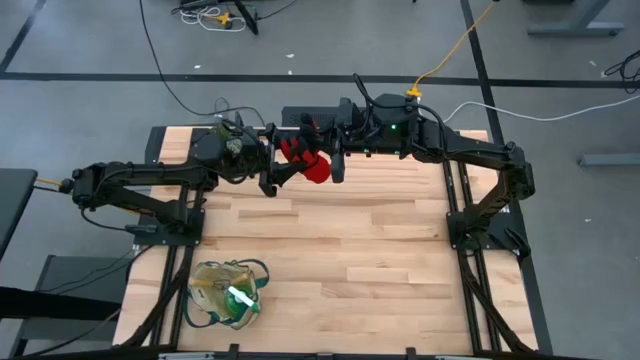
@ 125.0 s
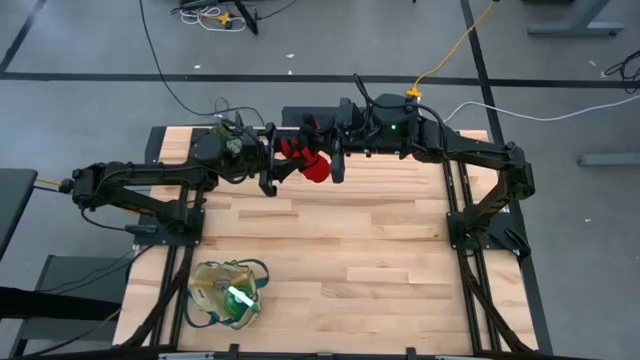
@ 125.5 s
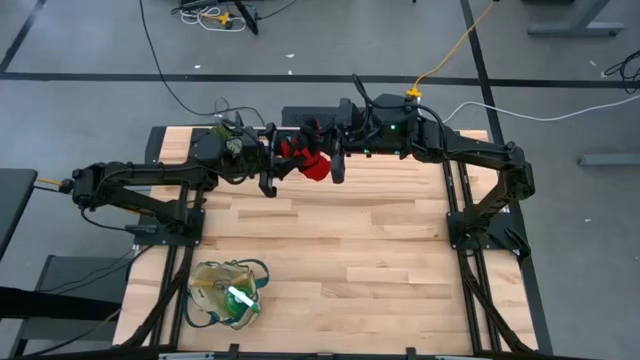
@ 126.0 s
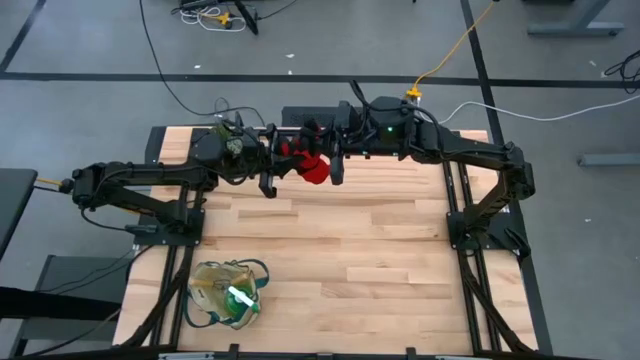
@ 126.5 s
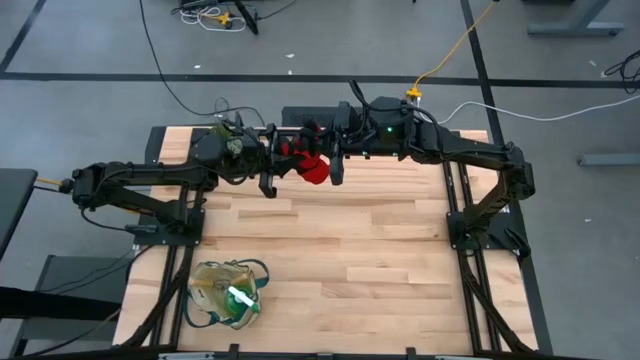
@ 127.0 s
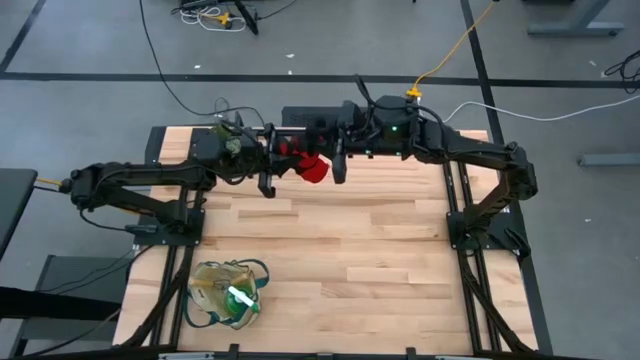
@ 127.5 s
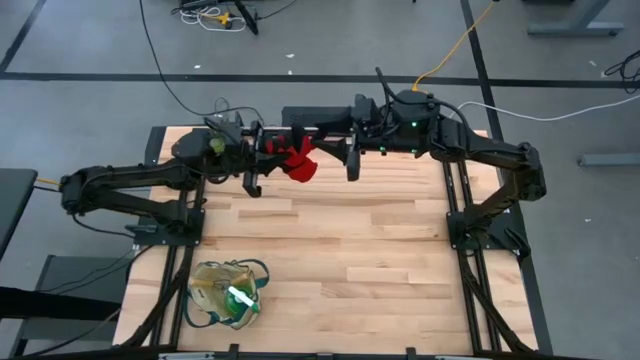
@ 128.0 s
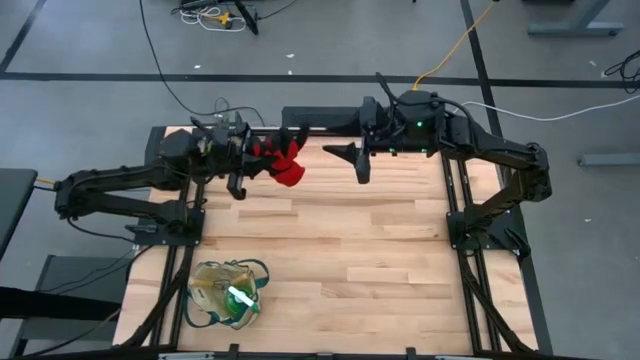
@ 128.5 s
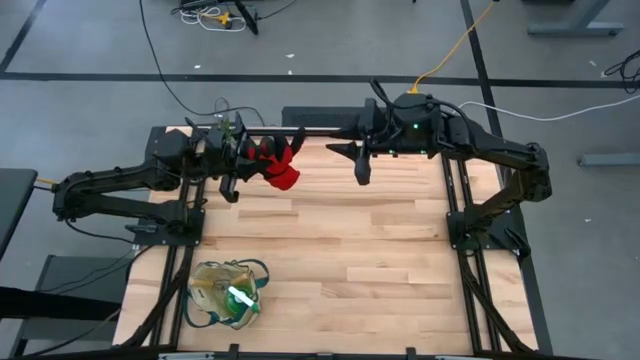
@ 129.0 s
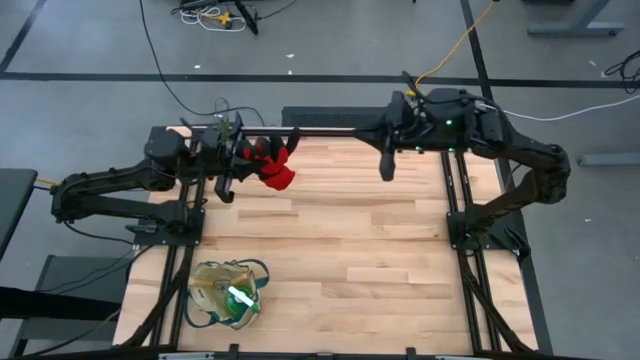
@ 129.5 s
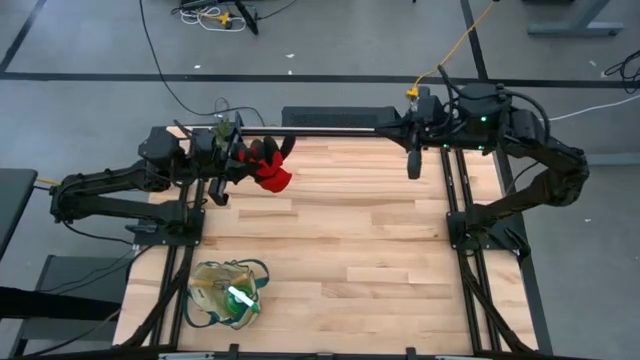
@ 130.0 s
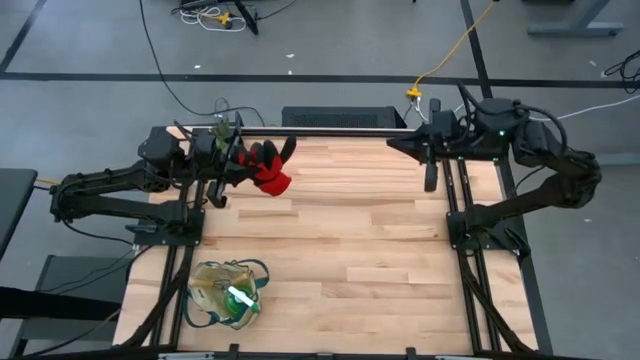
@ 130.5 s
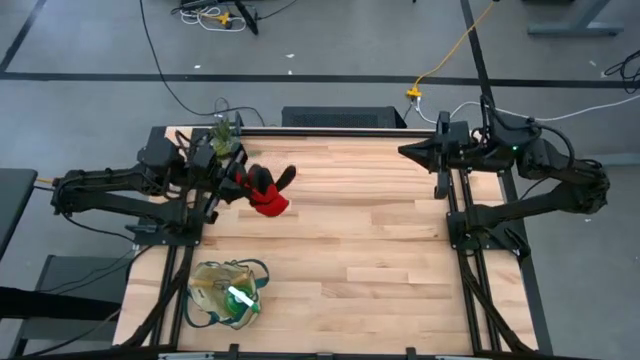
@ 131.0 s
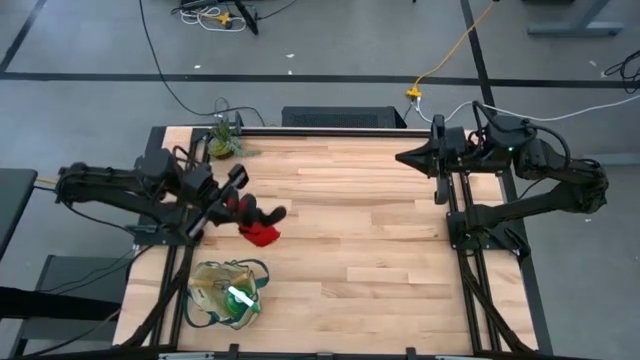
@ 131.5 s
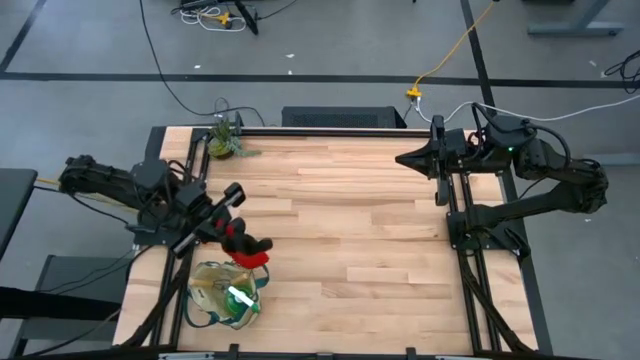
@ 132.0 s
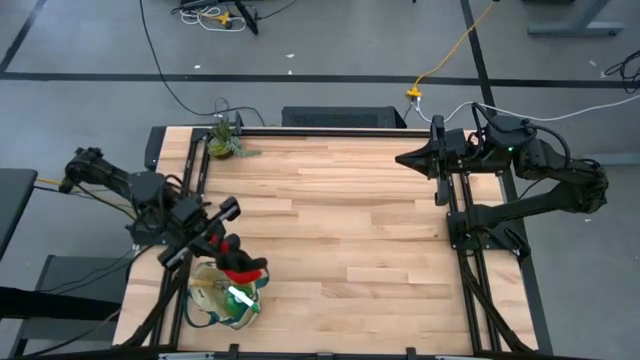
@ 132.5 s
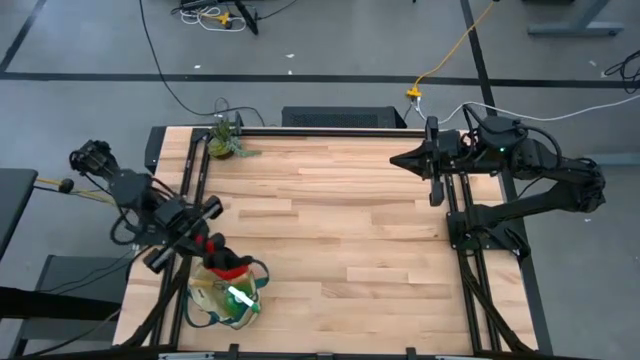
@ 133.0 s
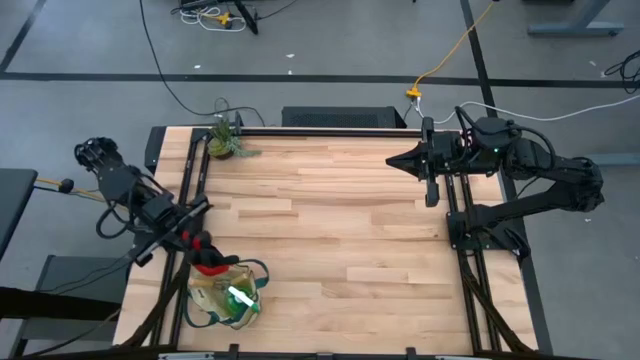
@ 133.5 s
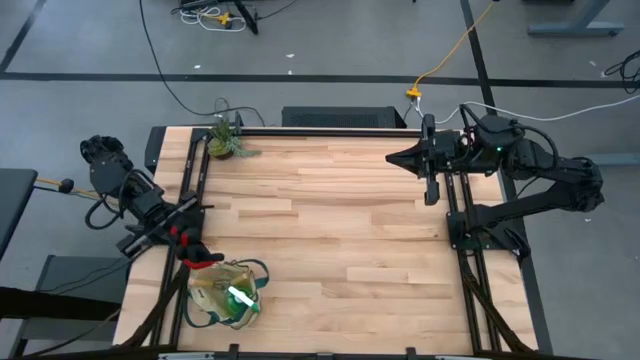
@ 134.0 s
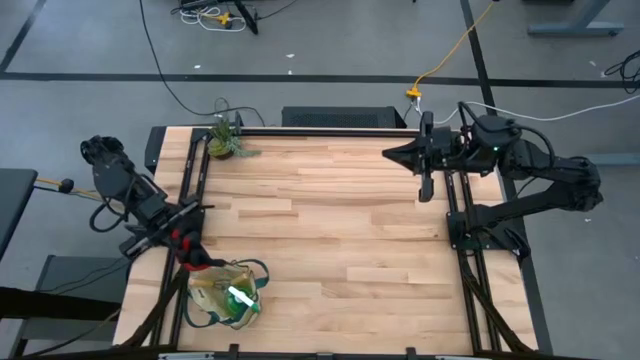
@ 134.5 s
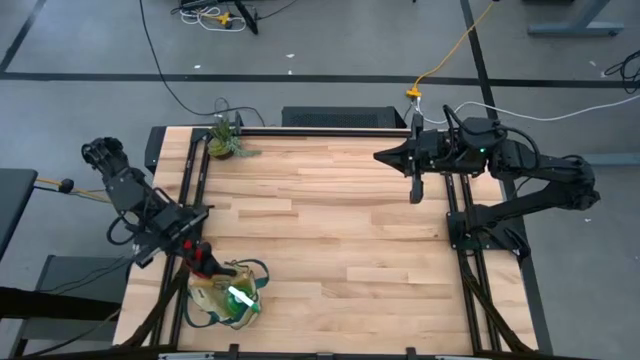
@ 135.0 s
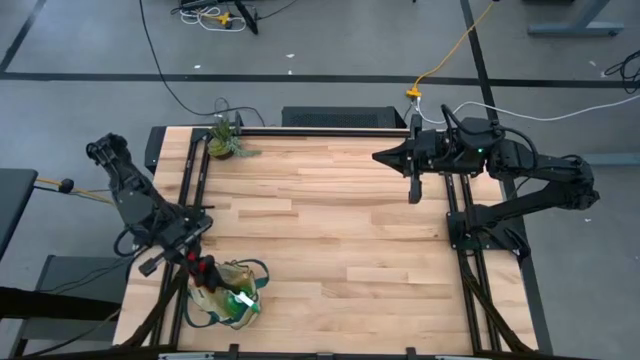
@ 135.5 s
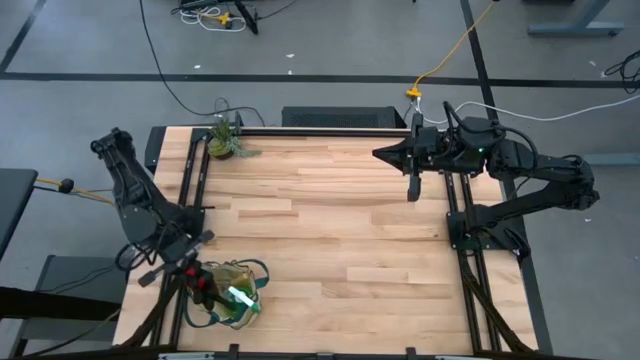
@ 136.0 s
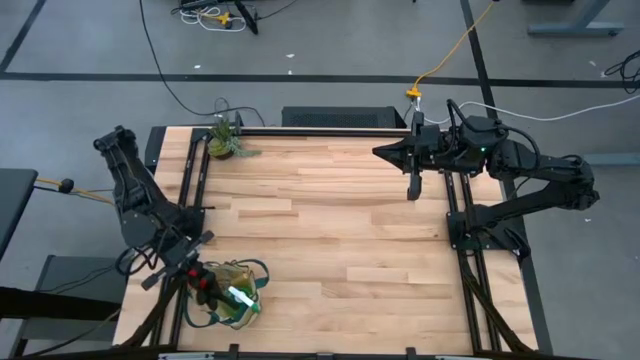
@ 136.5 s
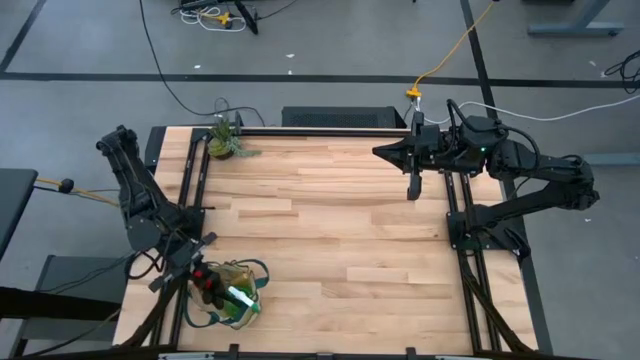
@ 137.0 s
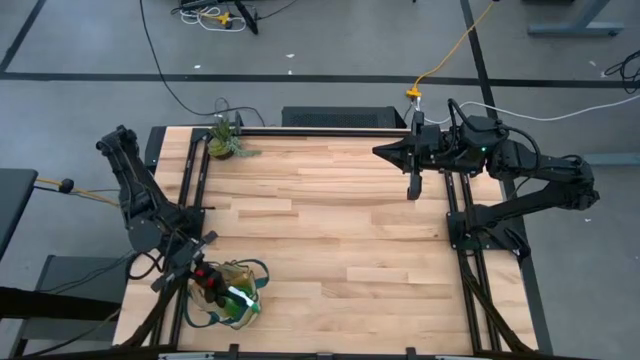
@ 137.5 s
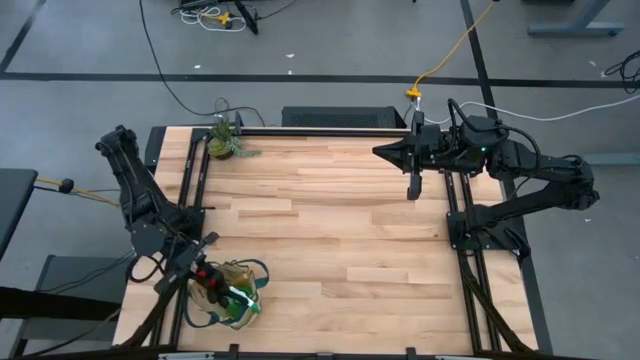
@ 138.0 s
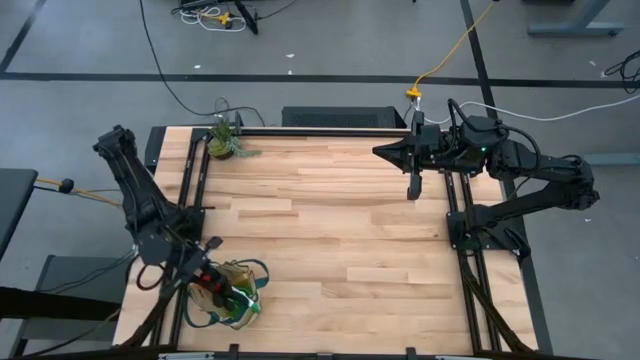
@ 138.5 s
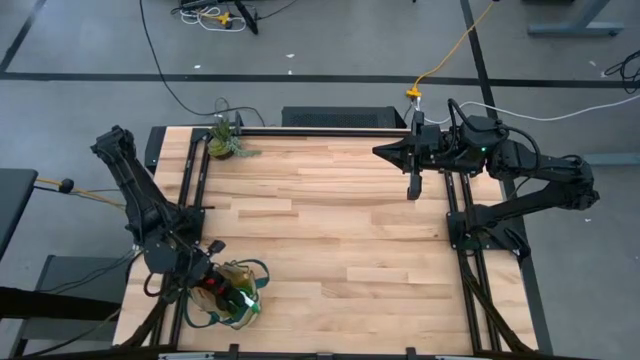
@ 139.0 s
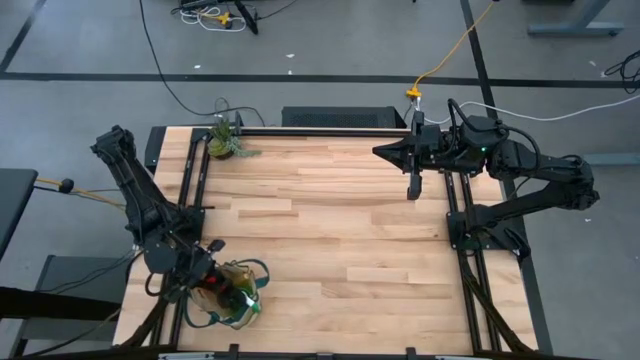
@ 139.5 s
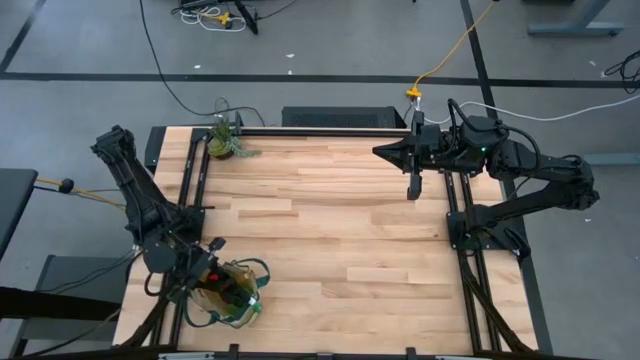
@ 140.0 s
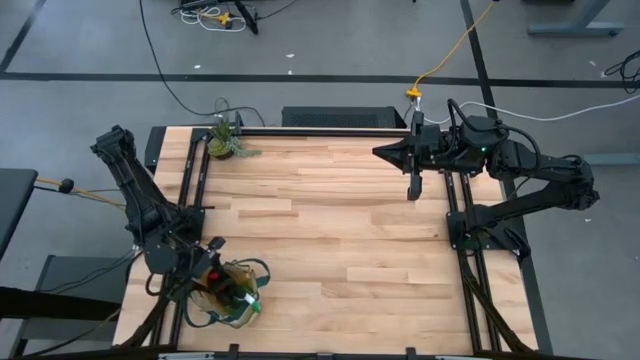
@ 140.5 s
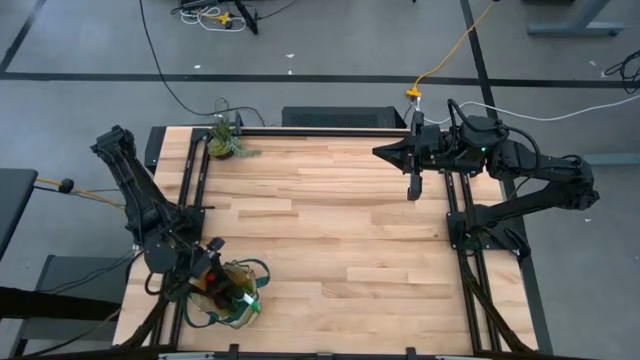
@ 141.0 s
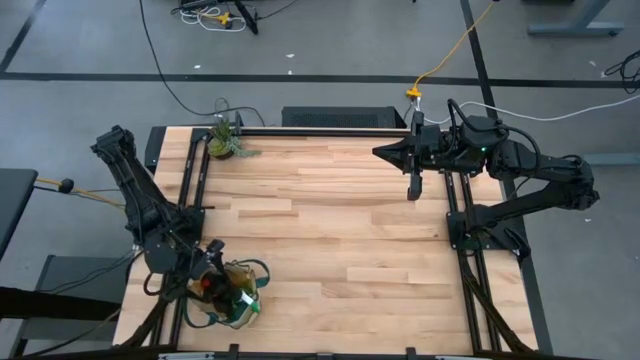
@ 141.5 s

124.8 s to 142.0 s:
Task: Pick & Place Garden tools in Gardening bag
Put the red gloves into the white gardening bag

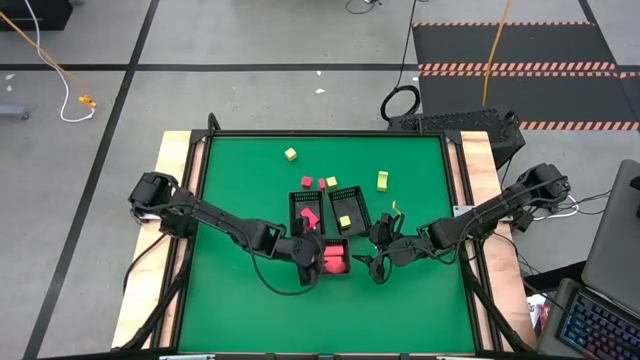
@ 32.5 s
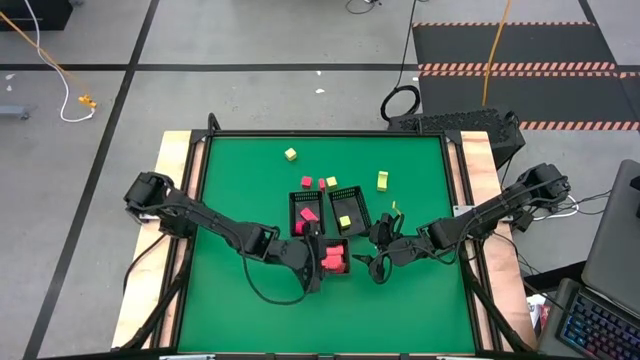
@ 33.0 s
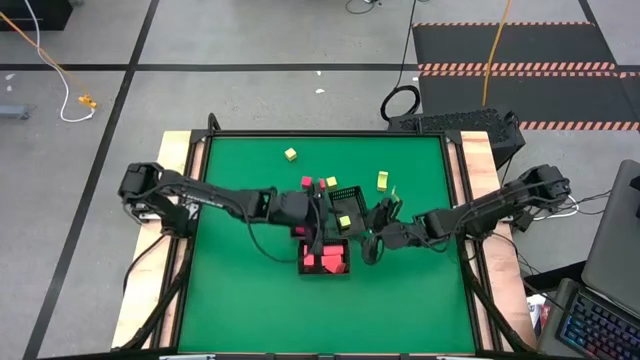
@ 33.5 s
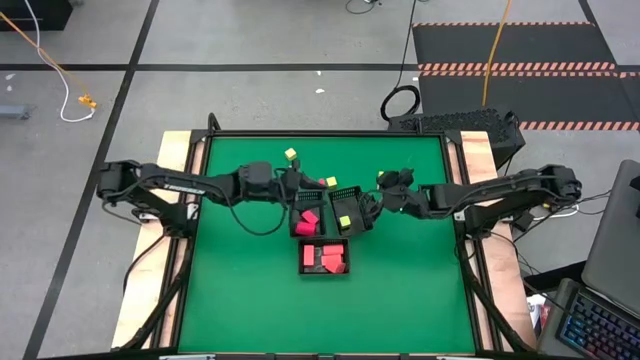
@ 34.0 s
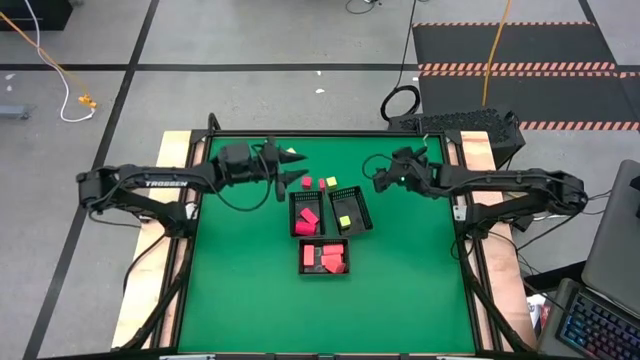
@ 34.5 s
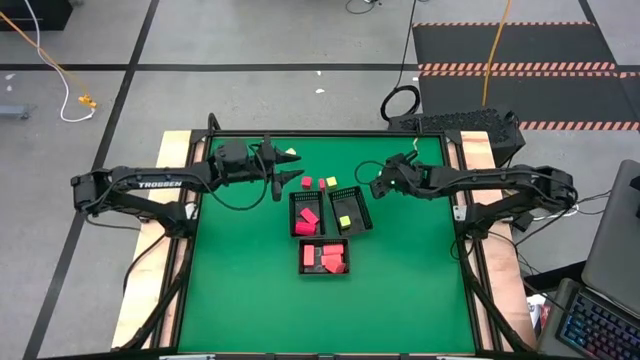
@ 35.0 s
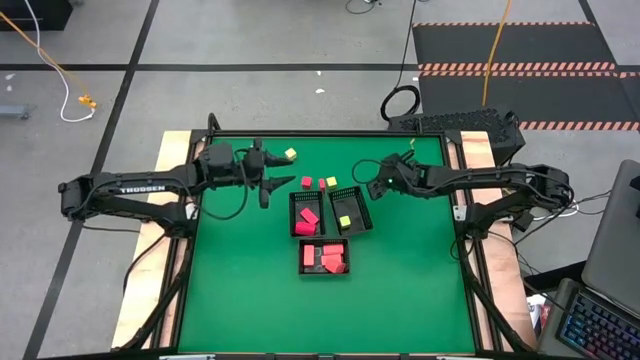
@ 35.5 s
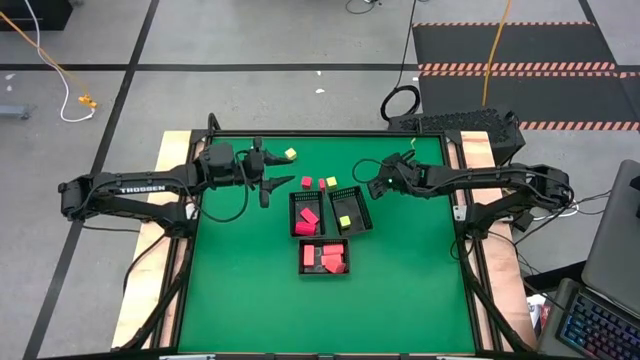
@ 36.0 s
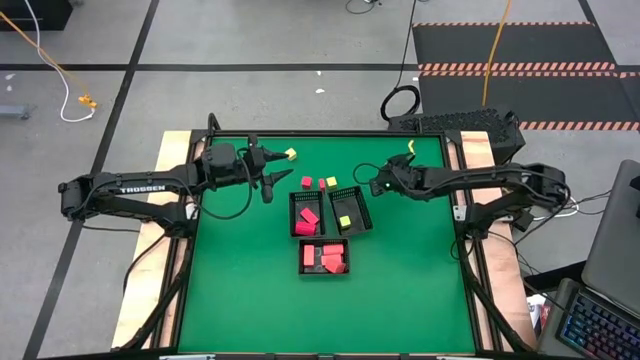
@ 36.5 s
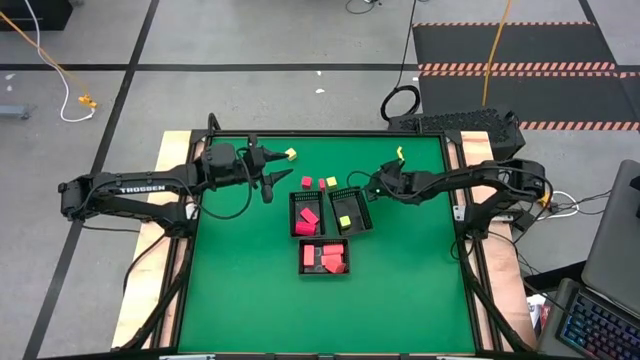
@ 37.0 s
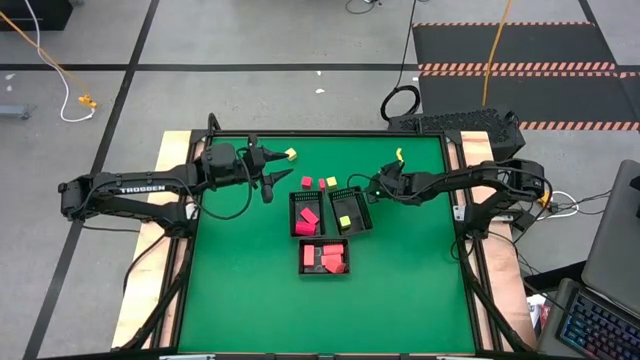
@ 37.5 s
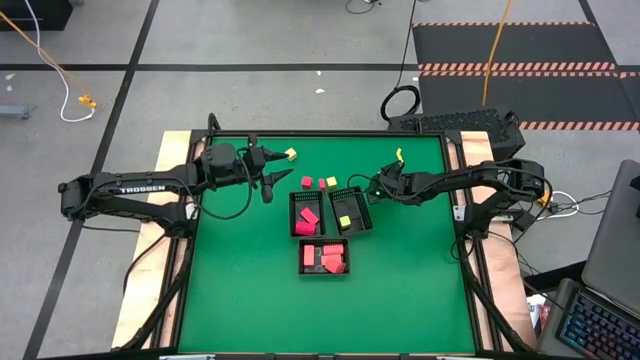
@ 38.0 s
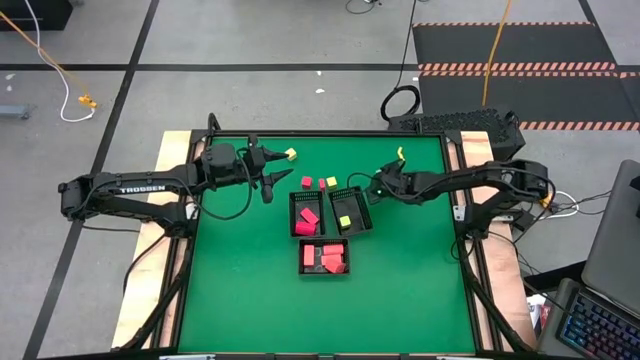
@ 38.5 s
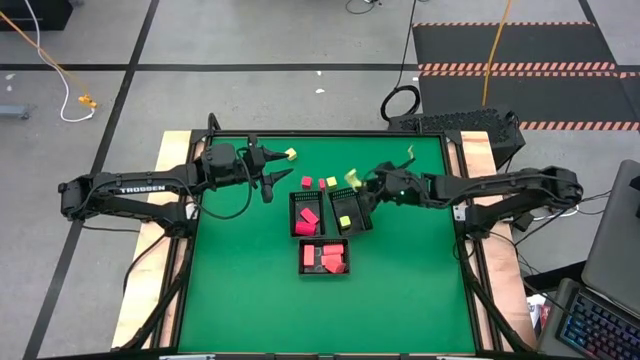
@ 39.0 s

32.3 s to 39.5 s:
Task: Sort & place blocks by color
Put the green block into the top right black bin
